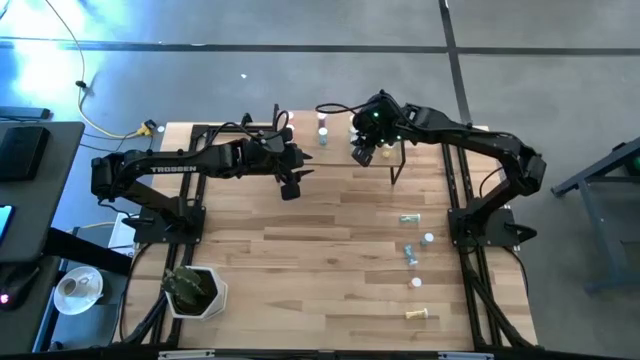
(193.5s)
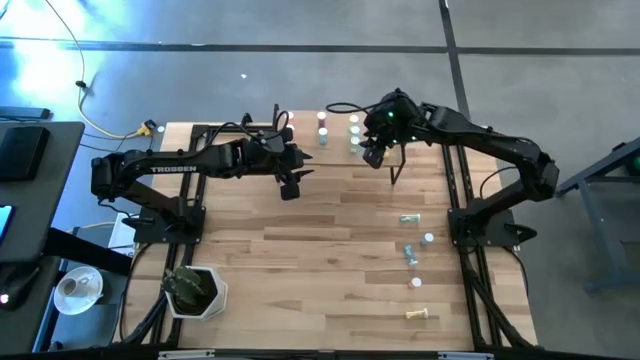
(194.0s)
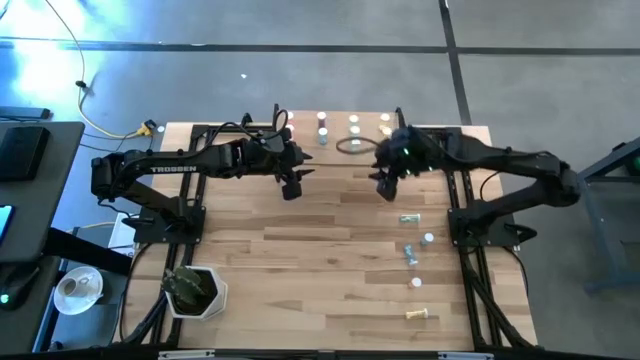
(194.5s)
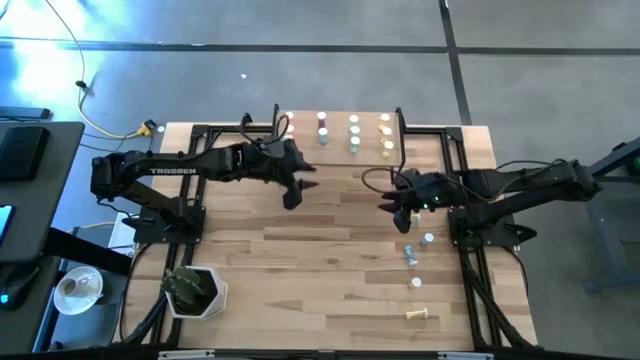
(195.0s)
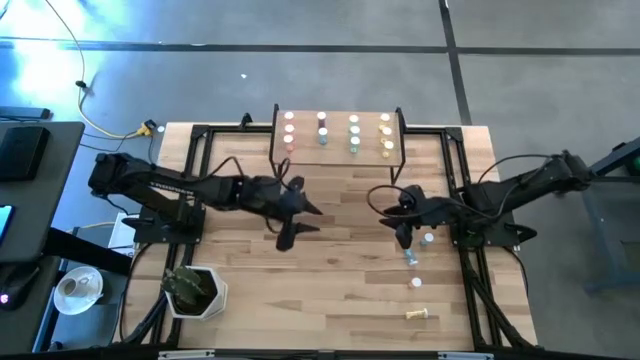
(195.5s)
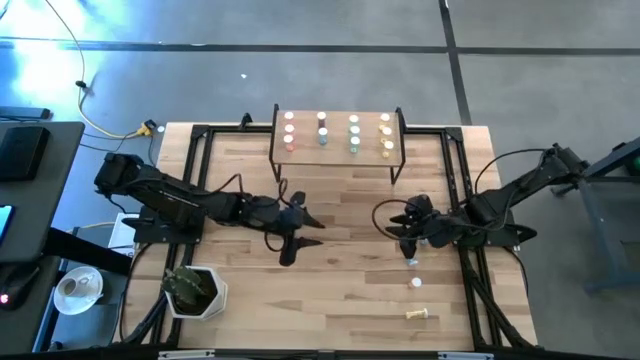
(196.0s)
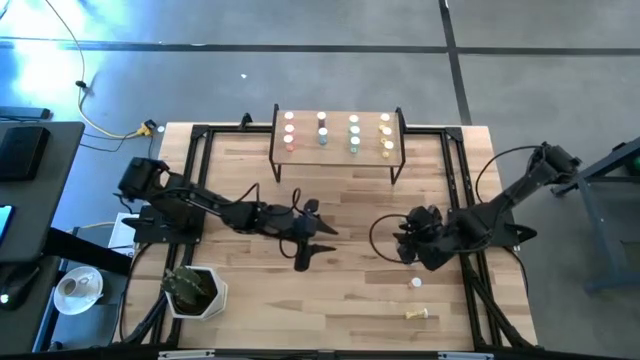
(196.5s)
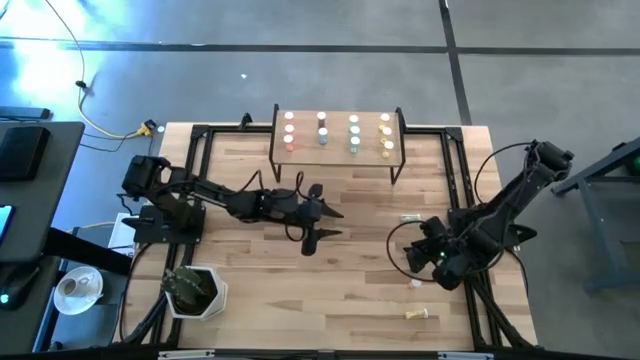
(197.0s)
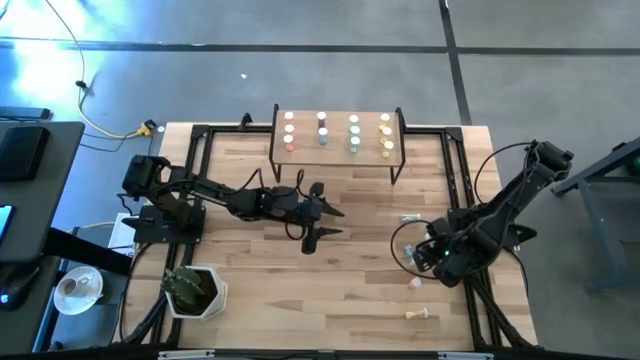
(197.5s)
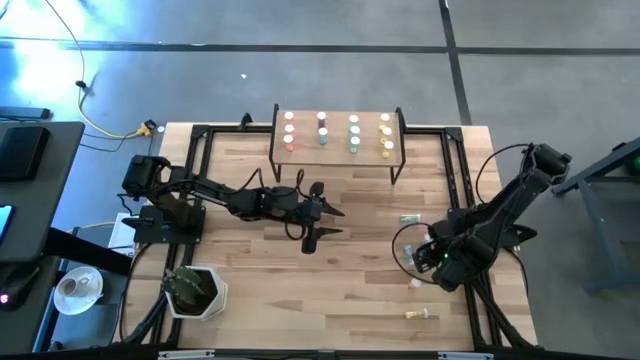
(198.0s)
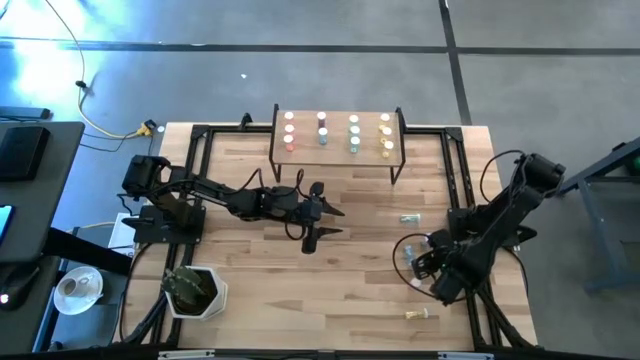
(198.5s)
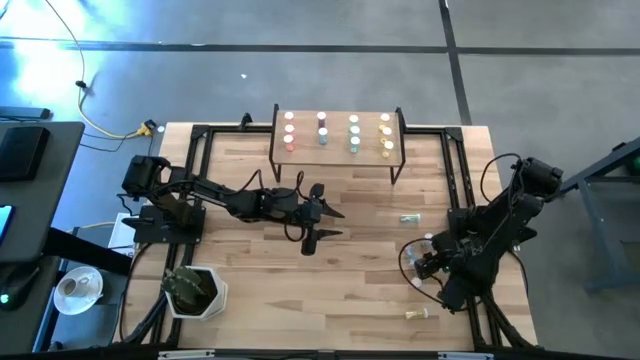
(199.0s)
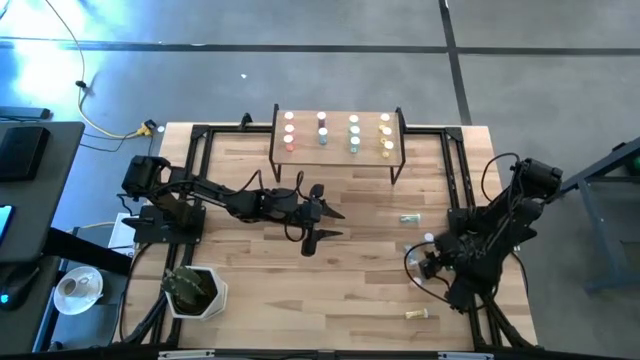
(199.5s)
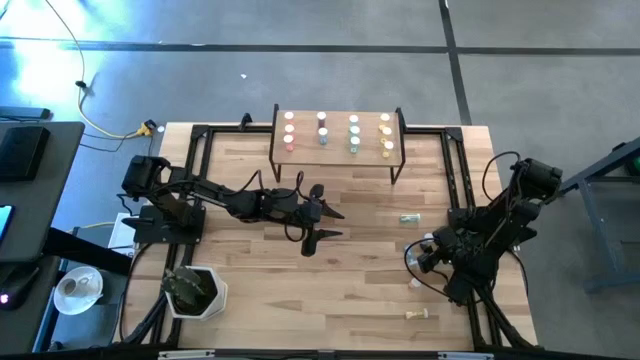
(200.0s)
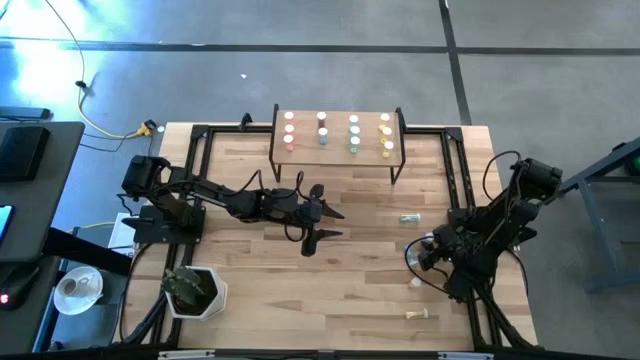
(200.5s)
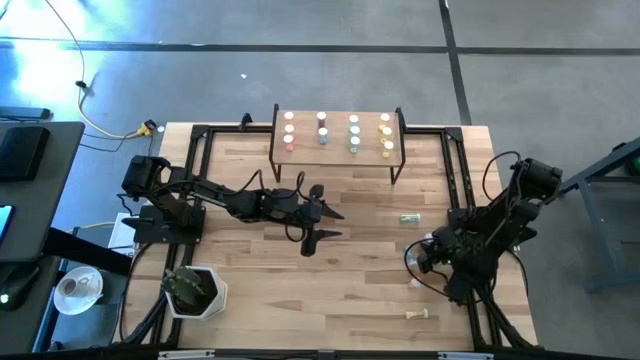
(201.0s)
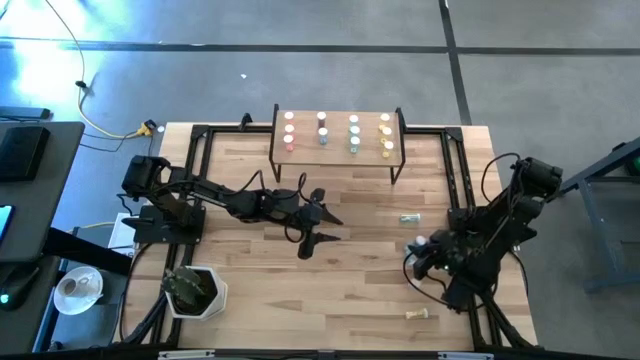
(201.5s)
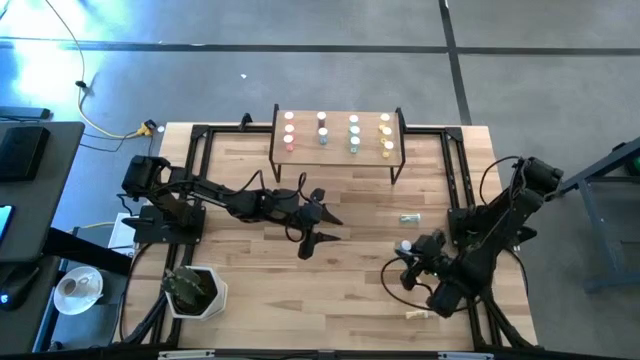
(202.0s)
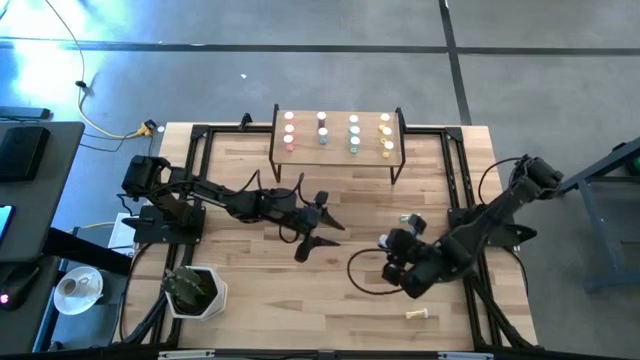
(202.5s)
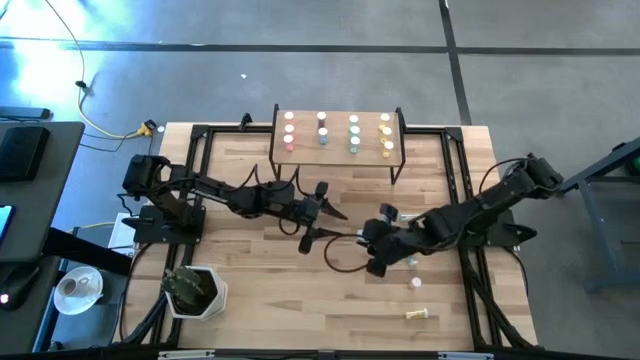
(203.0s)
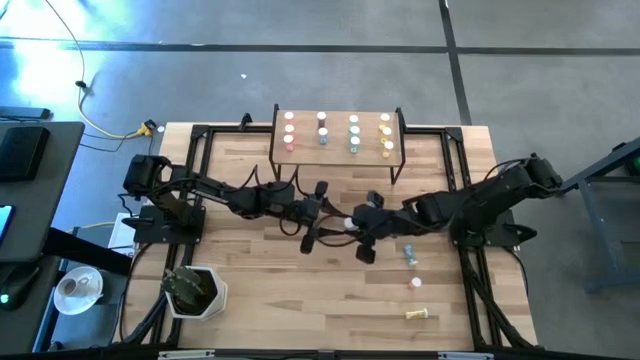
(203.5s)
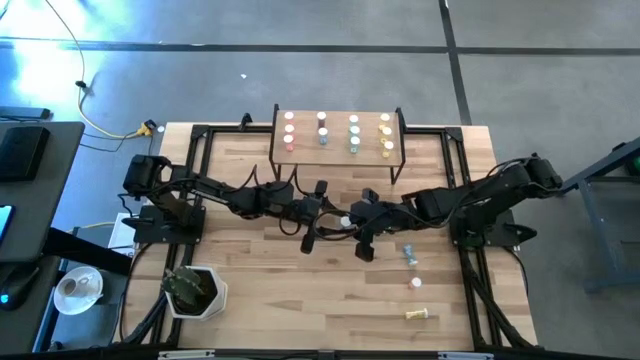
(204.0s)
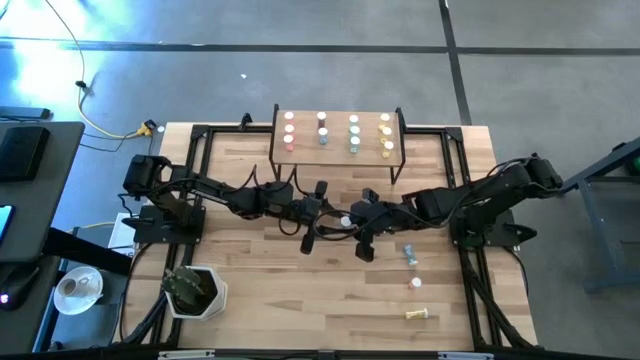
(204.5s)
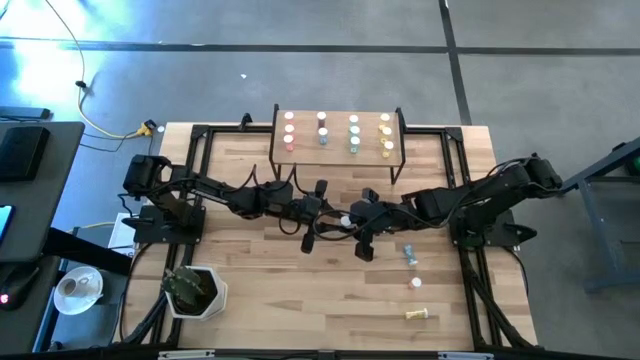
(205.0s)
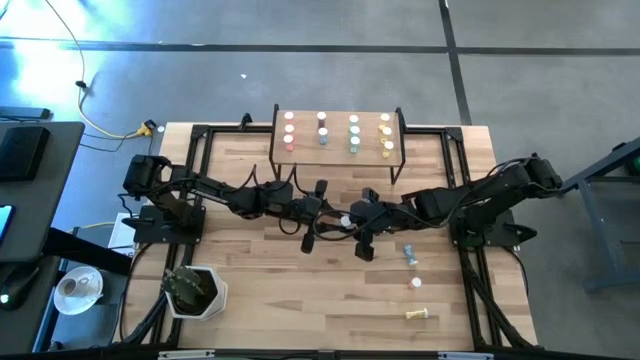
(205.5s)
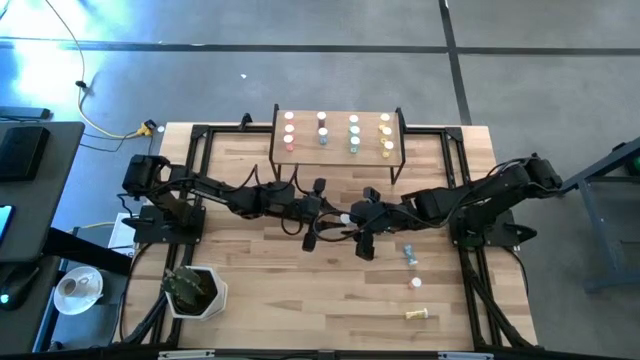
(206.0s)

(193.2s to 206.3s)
Task: Pick and place medicine bottles onto shelf by color
Put the blue pill bottle on the shelf aligned with the other blue pill bottles

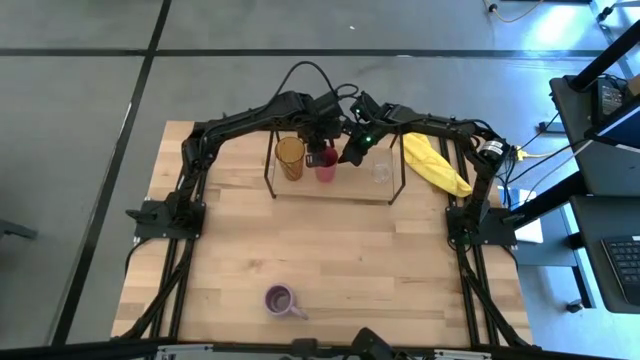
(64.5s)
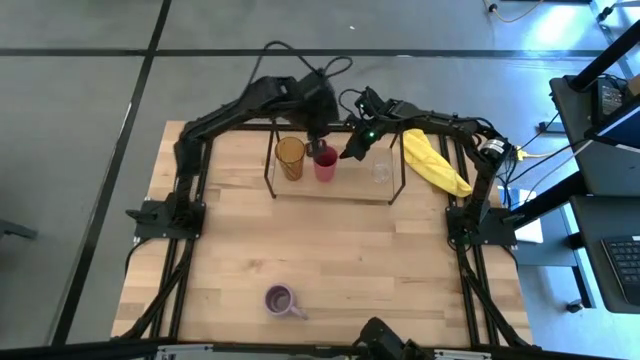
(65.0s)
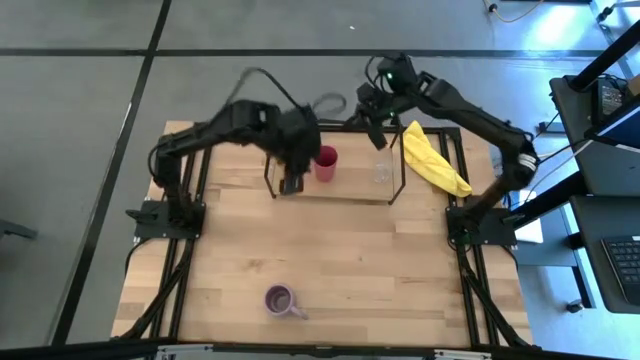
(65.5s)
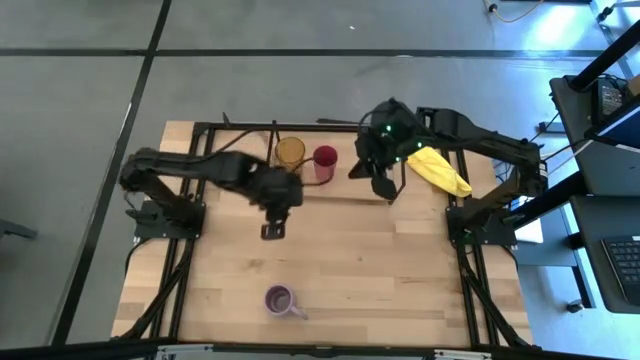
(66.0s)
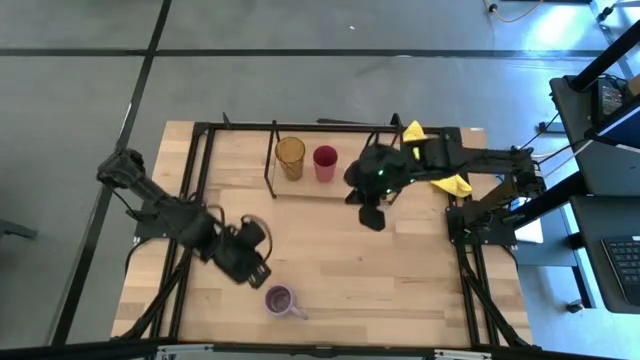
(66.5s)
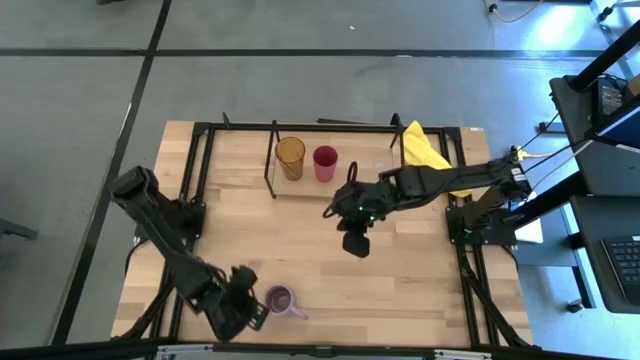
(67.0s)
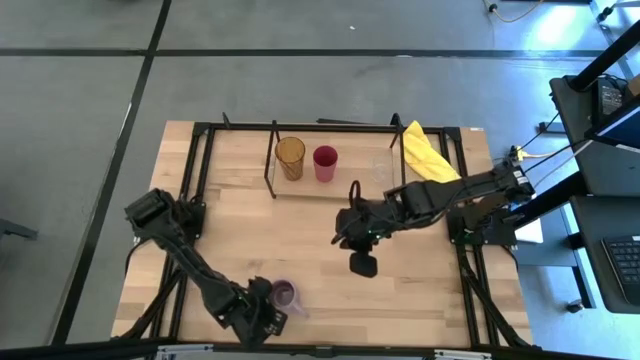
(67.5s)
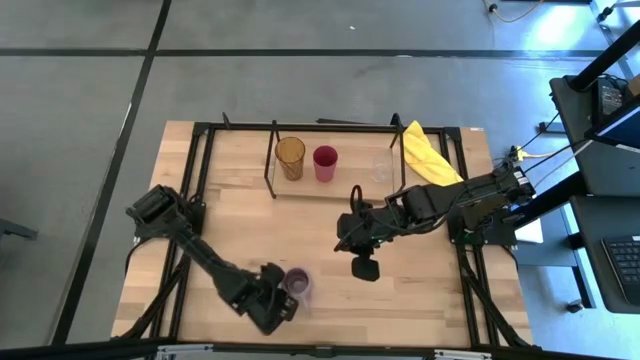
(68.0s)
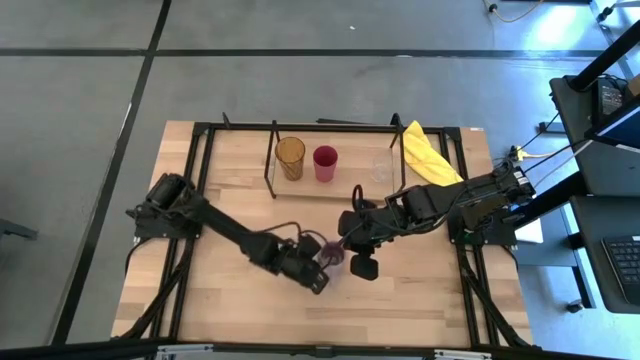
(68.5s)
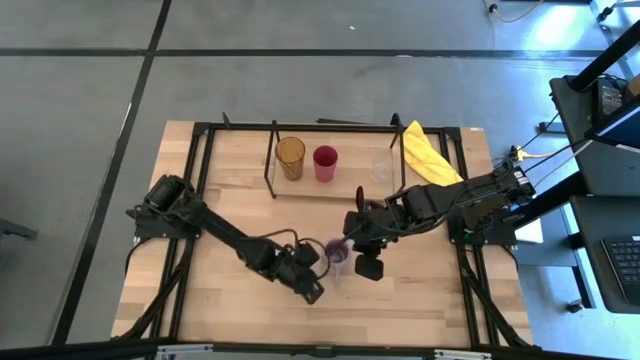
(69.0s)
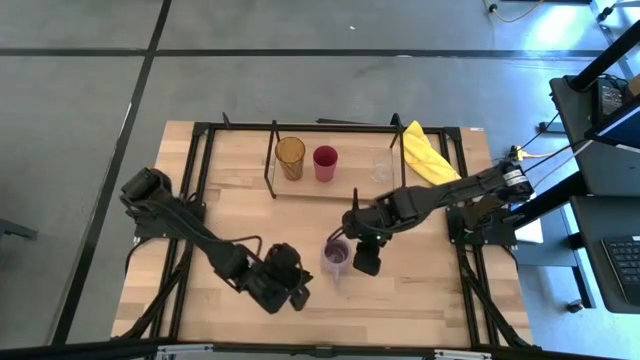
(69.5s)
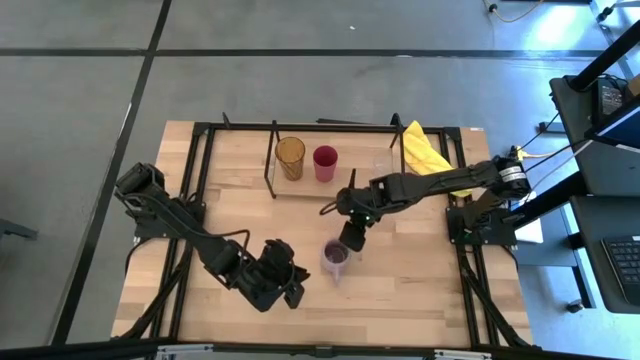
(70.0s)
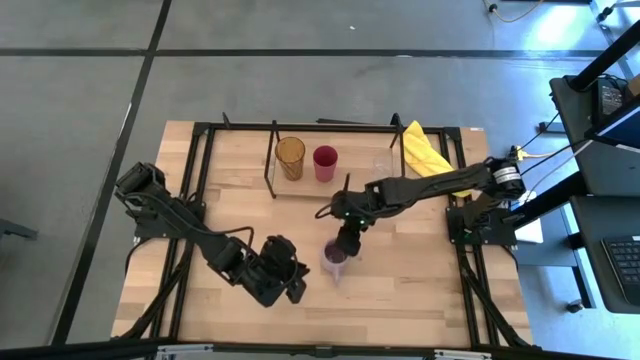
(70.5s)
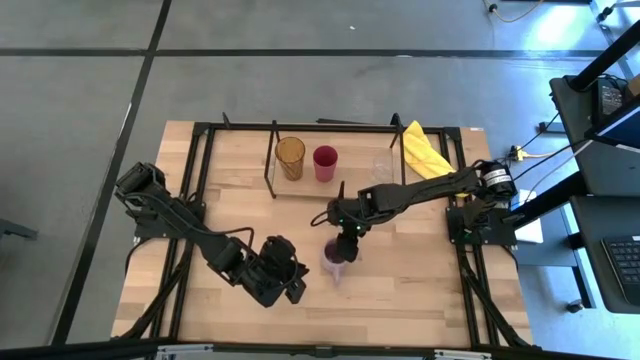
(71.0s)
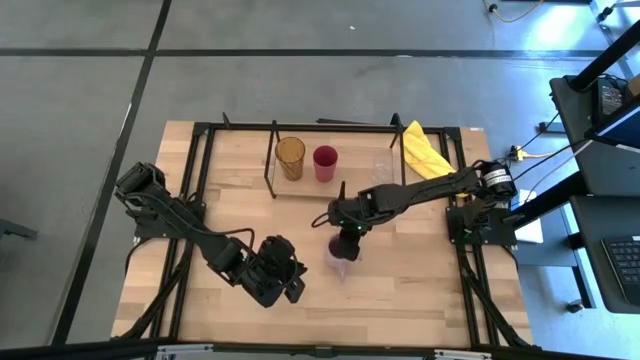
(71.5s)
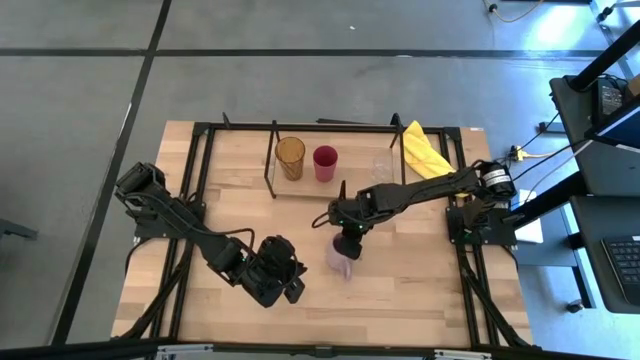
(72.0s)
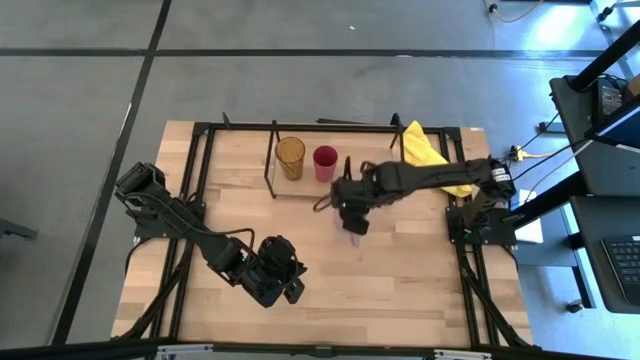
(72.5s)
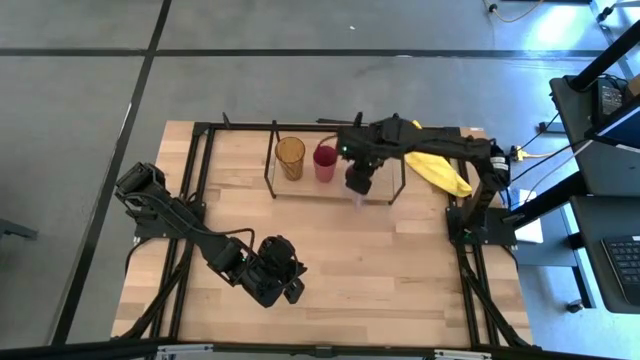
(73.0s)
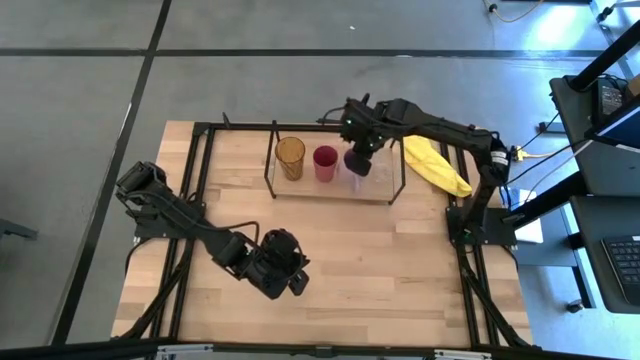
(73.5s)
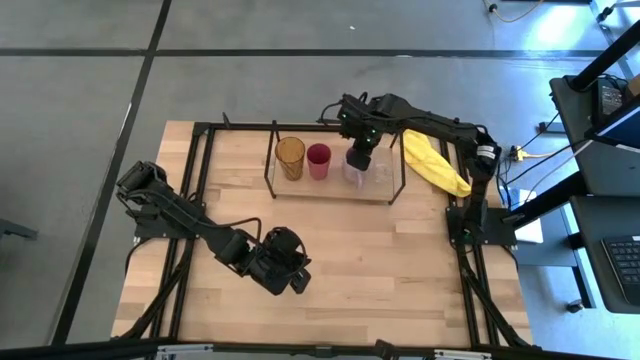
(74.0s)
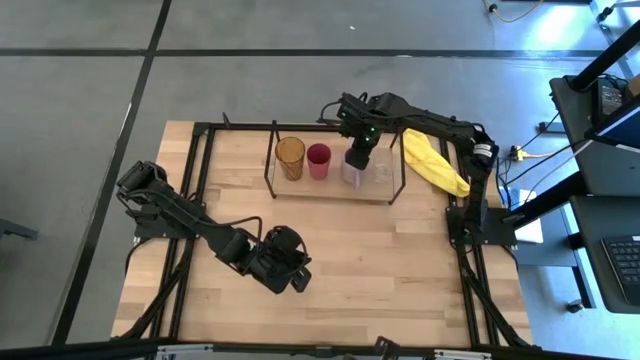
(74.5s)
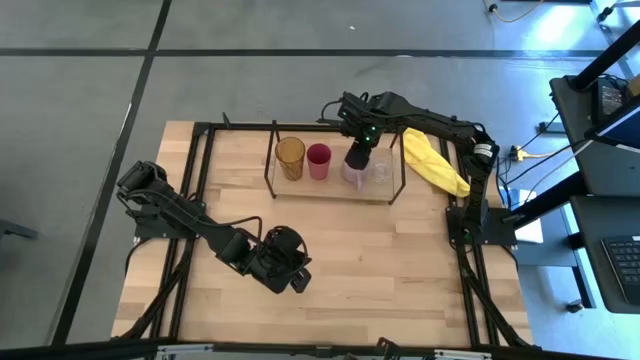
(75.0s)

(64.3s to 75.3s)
Task: Stack small to large cups/mugs on shelf
Put the purple mug on the shelf
